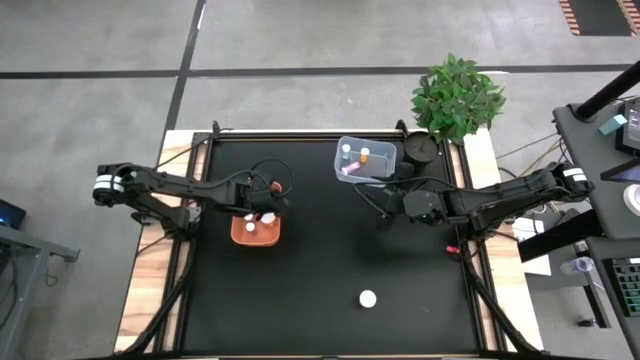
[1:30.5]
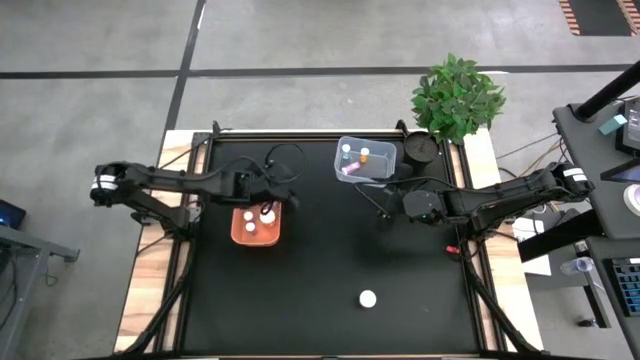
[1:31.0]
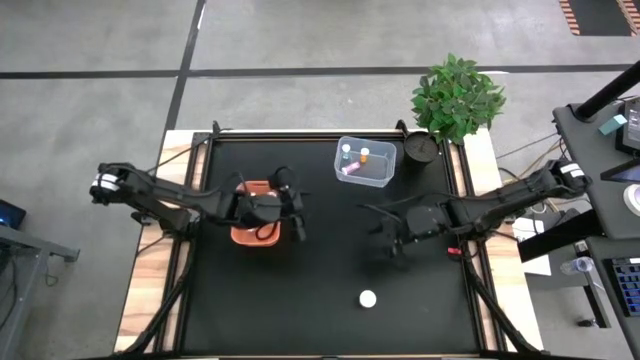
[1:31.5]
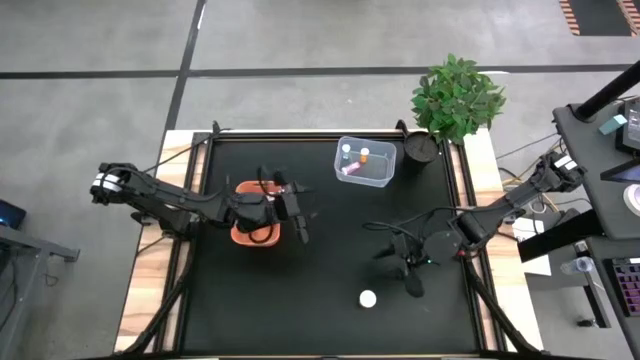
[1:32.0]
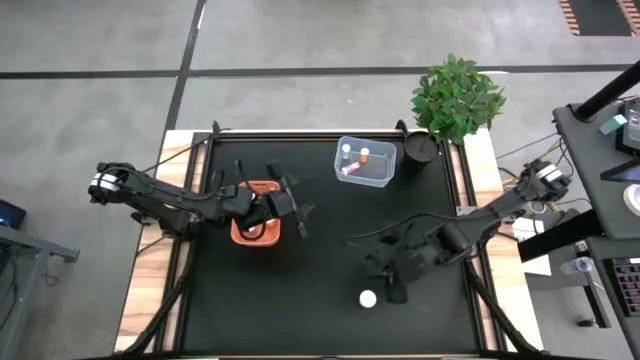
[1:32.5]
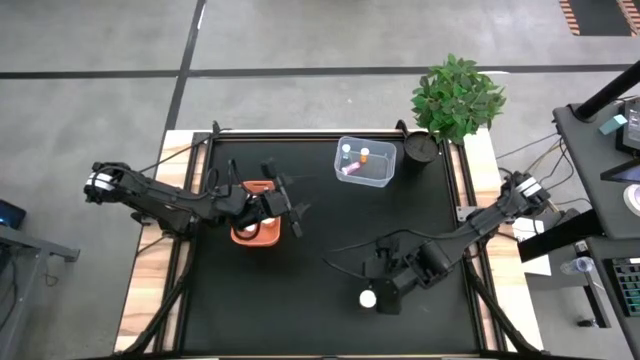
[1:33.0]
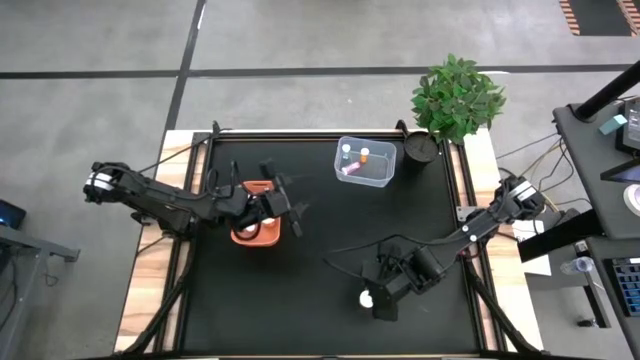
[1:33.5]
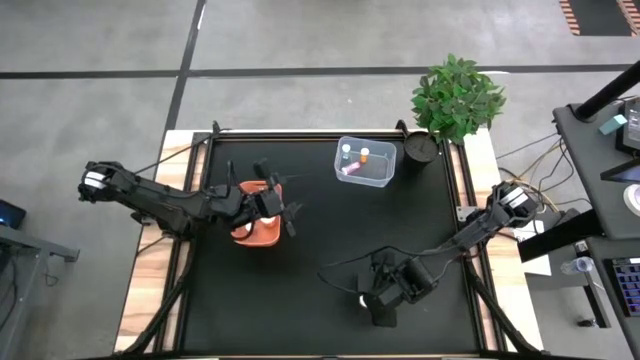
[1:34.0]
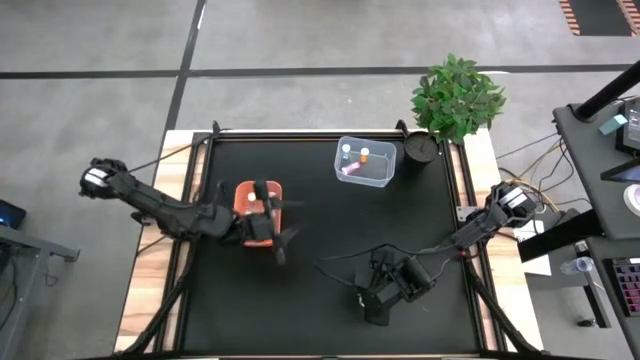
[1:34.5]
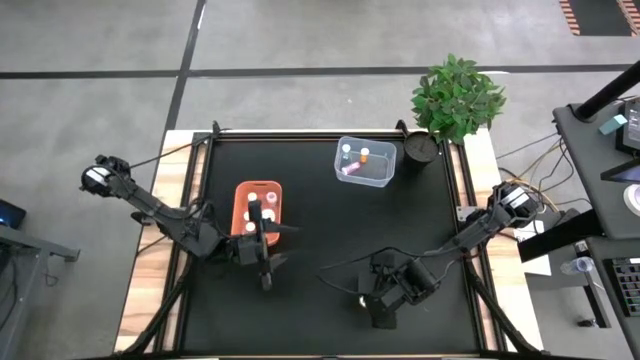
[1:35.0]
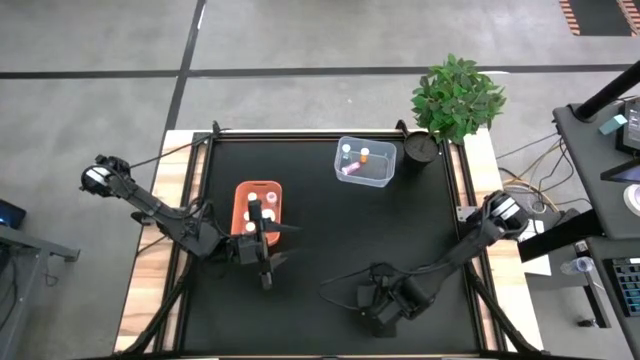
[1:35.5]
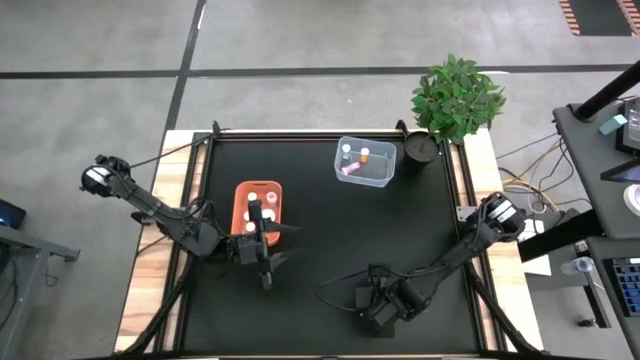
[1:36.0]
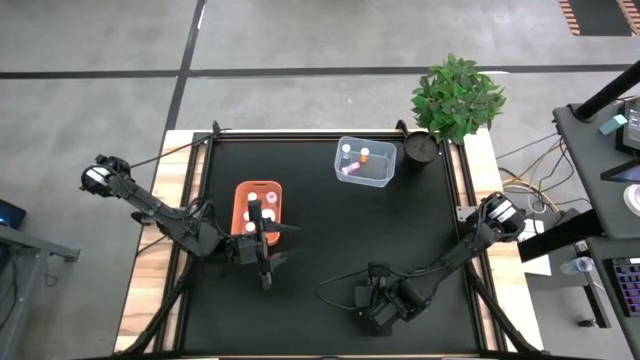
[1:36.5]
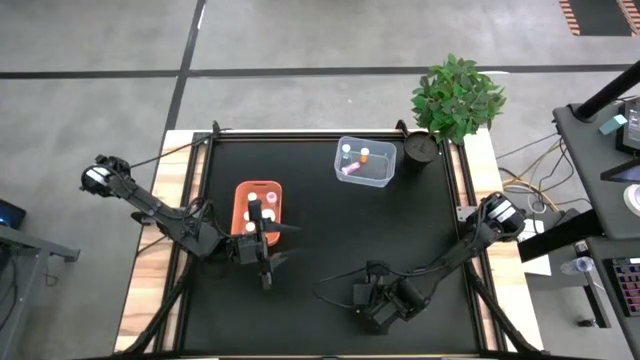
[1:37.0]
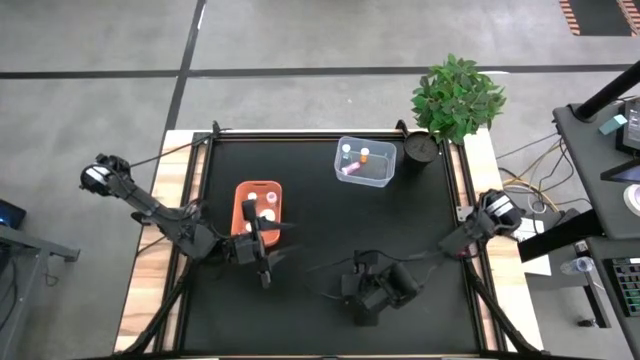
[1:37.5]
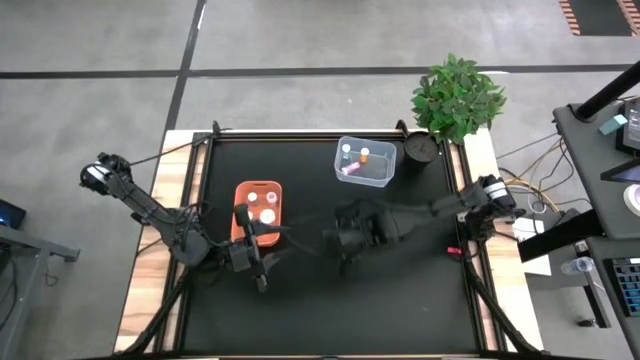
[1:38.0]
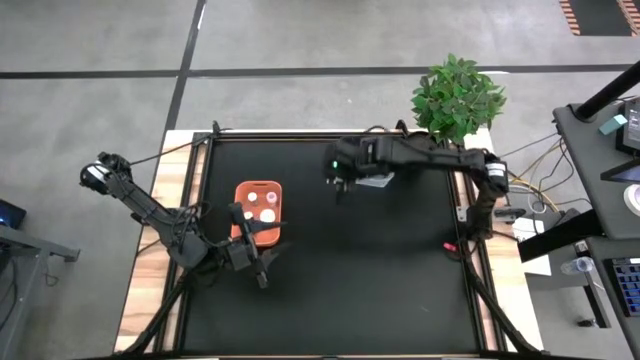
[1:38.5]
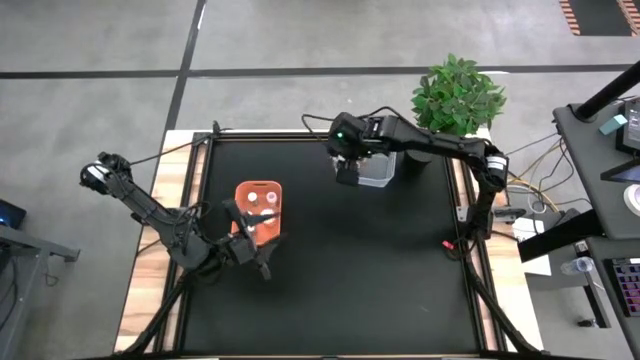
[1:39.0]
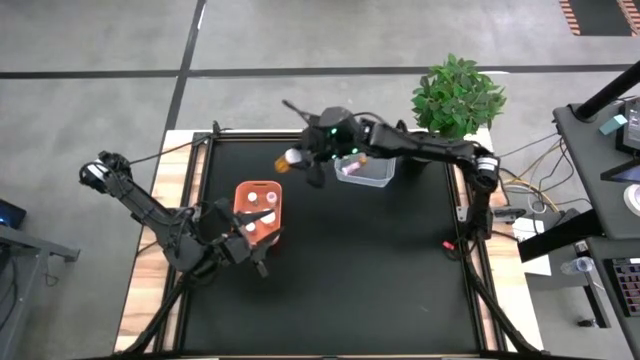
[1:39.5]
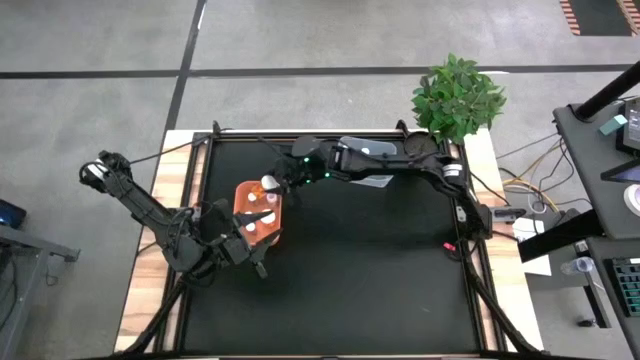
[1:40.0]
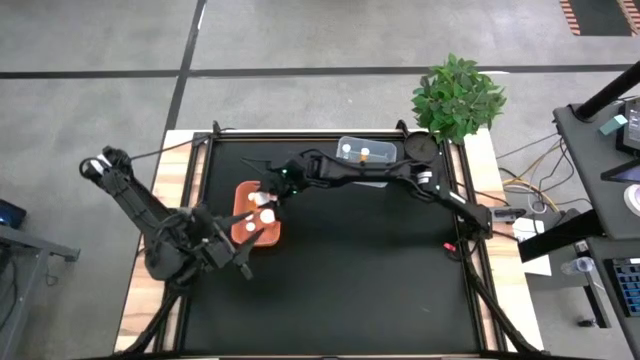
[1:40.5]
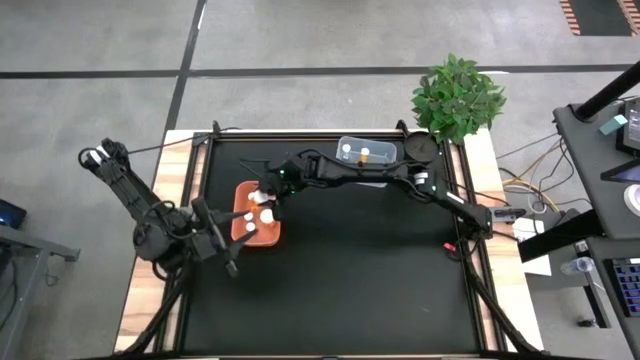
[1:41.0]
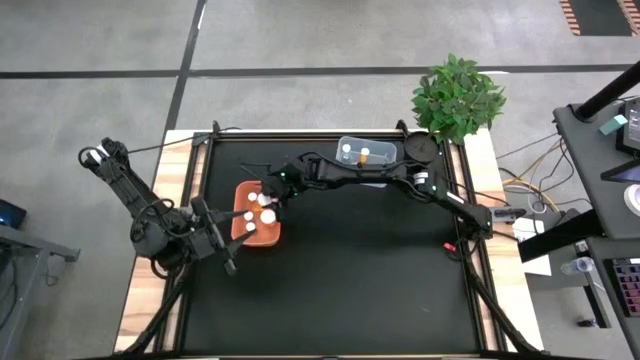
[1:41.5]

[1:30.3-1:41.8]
Task: Pick and place medicine bottles into bin by pill shape (circle, oval)
Put the large orange capsule pill bottle into the orange bin

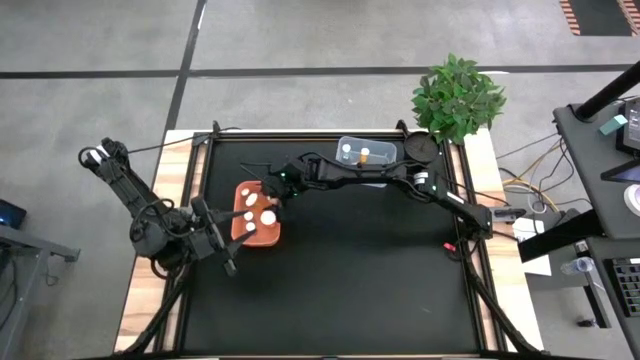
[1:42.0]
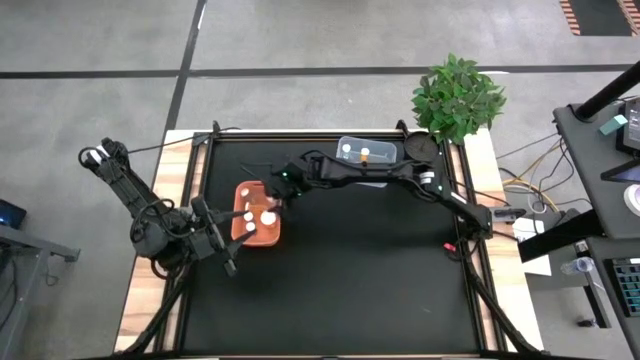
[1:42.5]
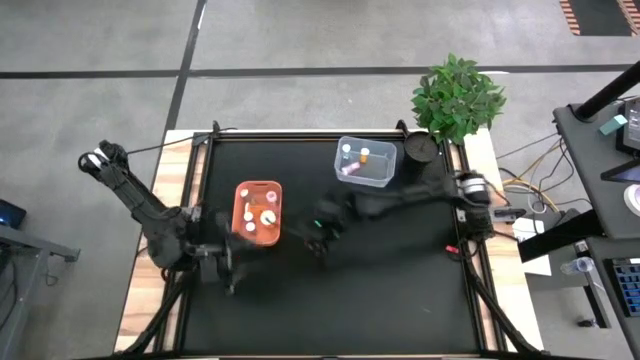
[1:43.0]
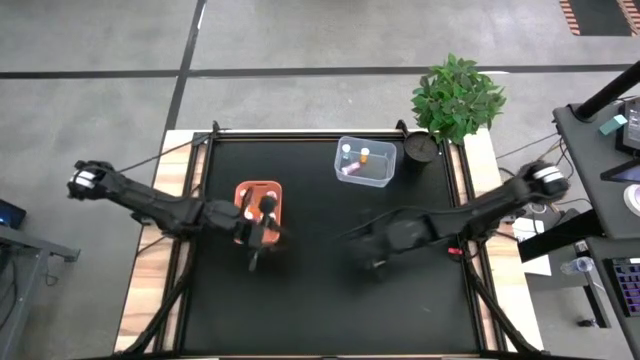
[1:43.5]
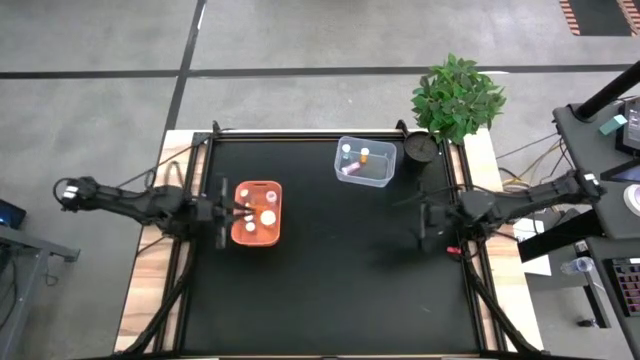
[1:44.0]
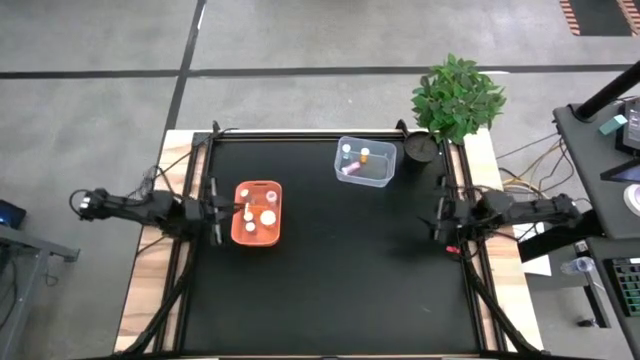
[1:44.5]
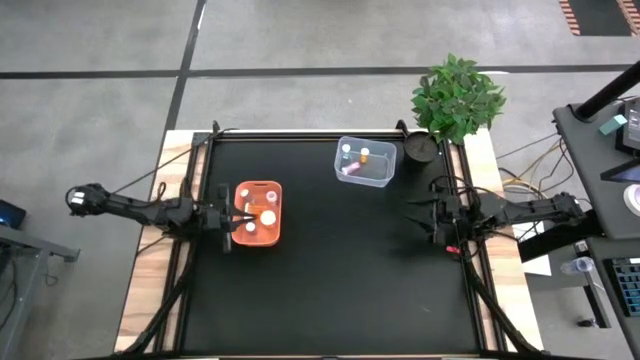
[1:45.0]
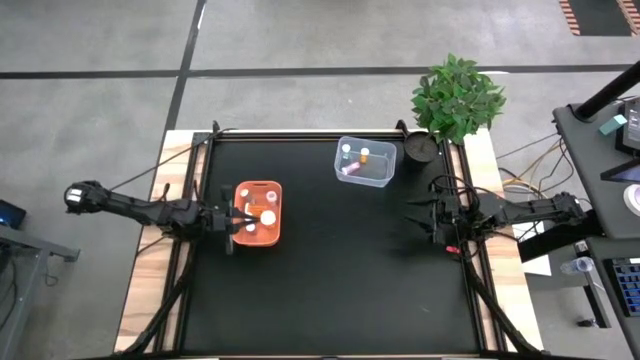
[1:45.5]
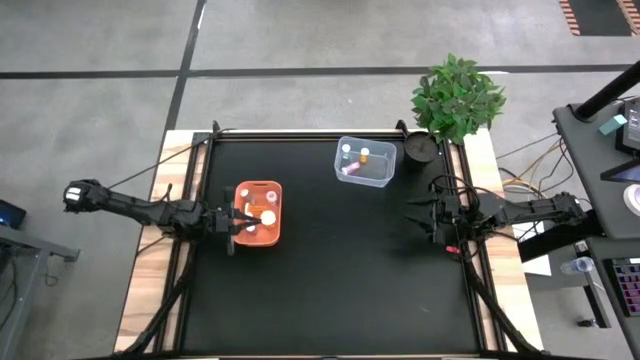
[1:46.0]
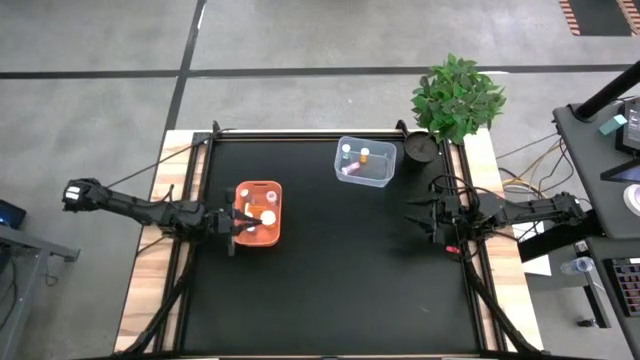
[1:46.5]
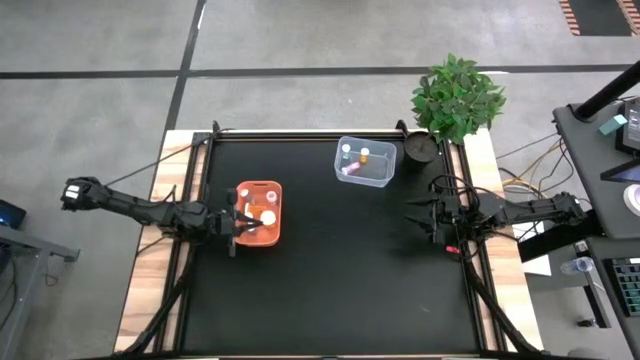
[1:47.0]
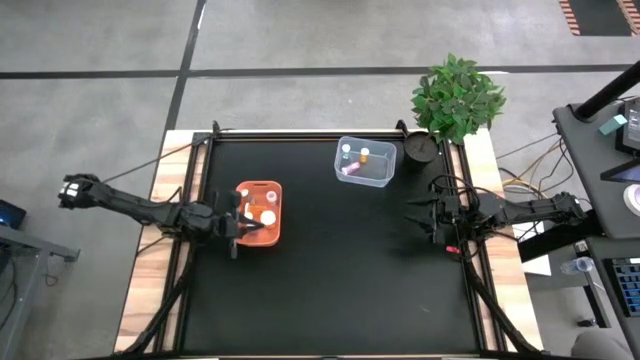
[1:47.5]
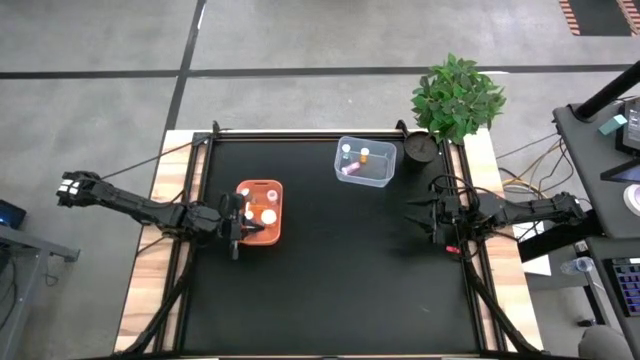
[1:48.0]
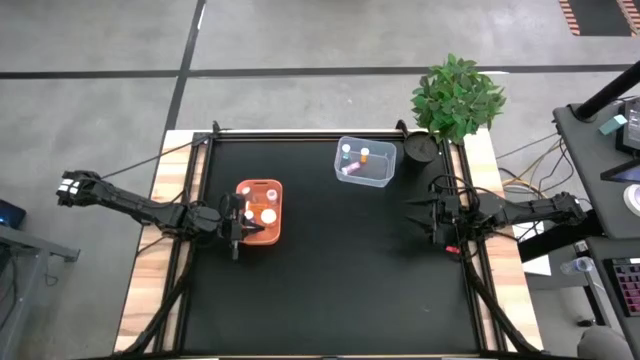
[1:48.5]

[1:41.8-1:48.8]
Return to Home Position

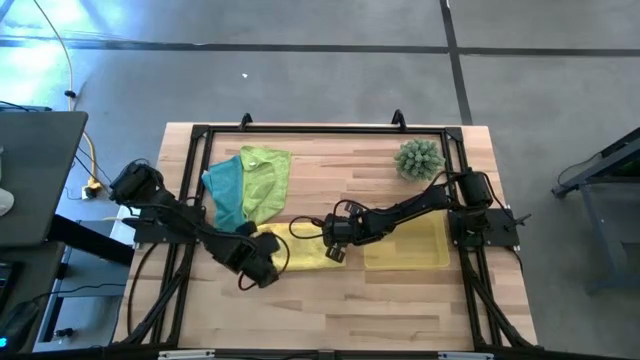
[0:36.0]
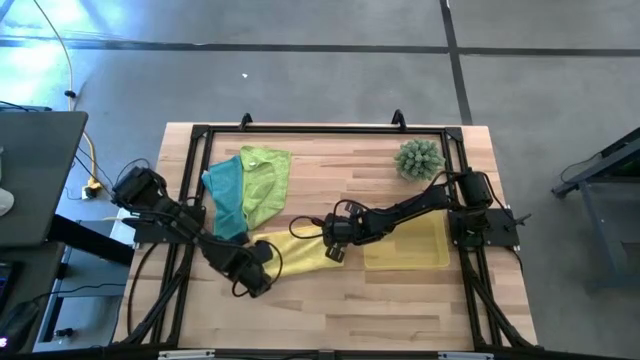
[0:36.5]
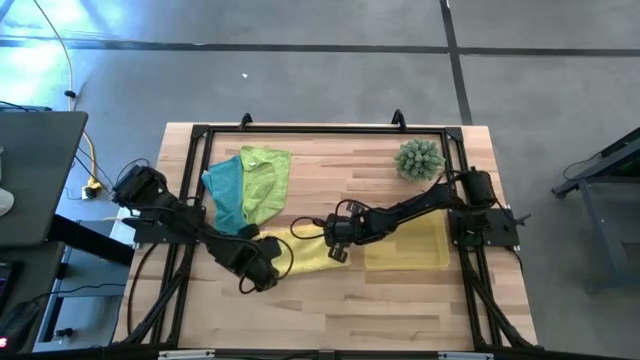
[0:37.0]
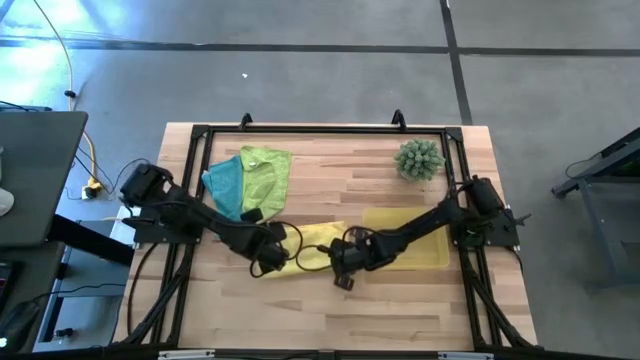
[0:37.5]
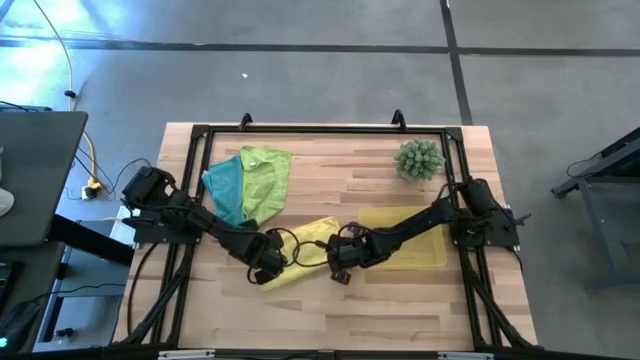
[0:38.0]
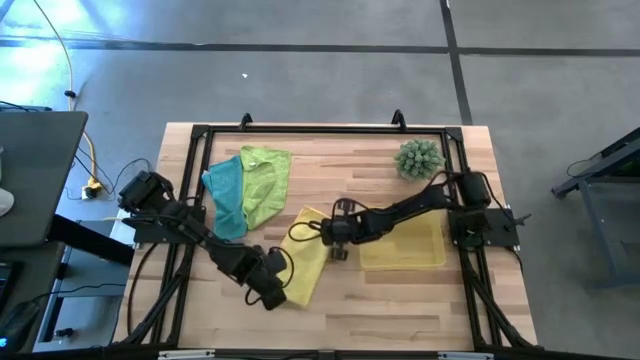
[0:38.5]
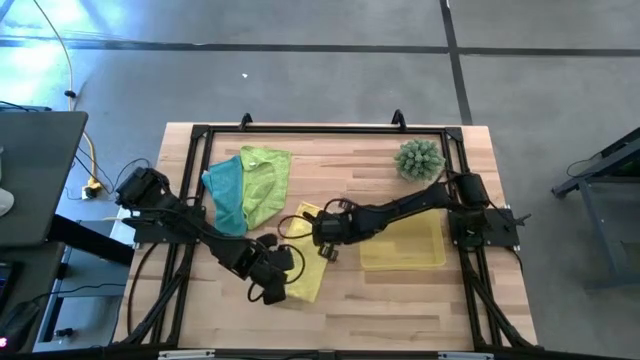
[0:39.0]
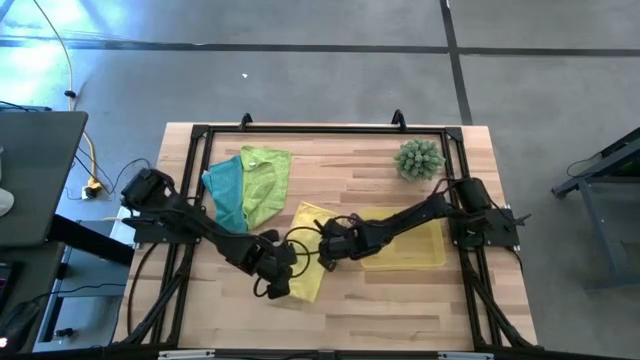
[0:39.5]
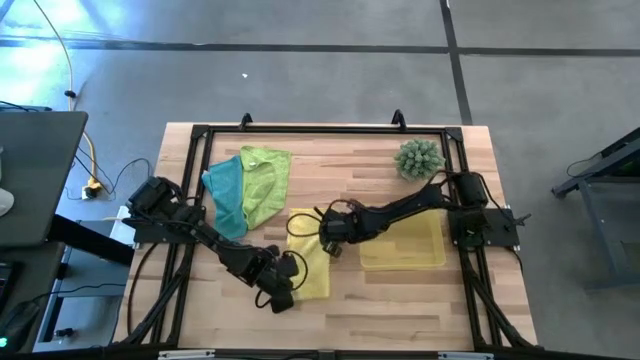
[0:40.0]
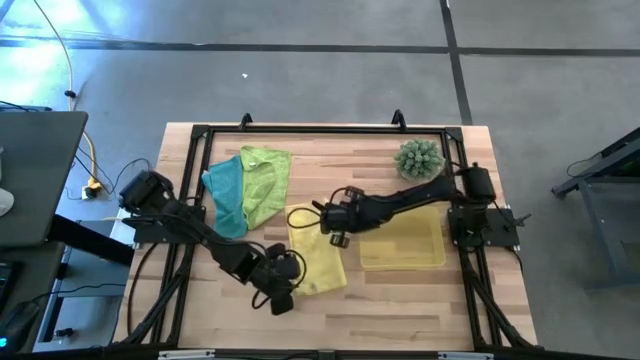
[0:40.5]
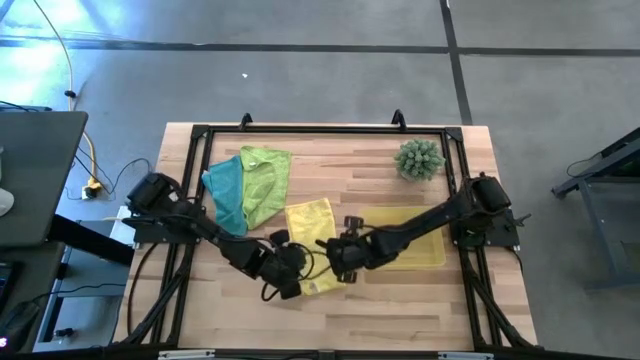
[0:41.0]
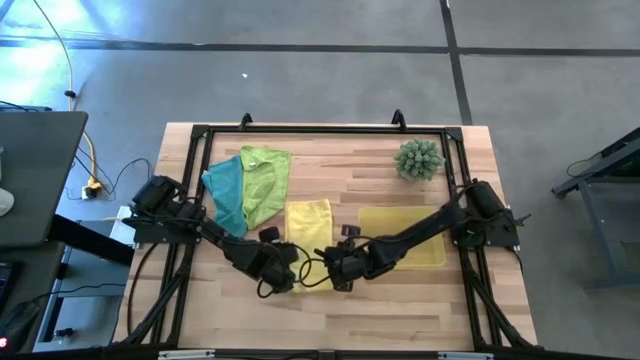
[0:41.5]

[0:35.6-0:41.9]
Task: Roll microfiber towels into tight, uniform cylinder then place into a basket
Fold the yellow microfiber towel
